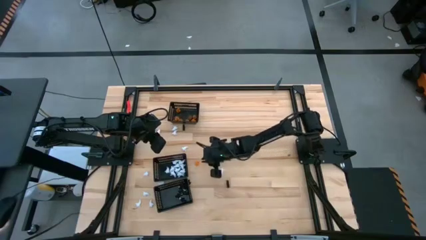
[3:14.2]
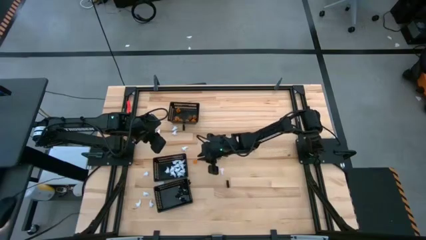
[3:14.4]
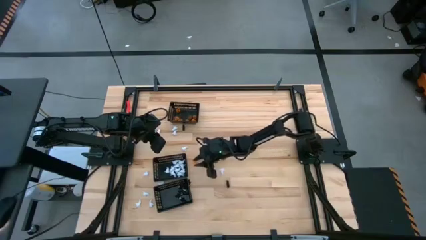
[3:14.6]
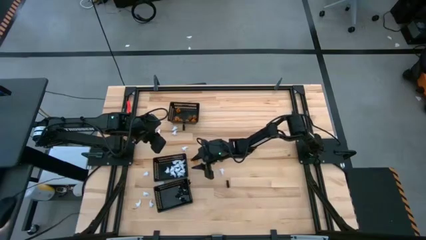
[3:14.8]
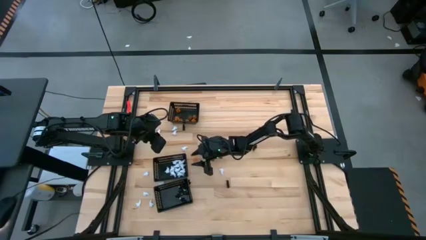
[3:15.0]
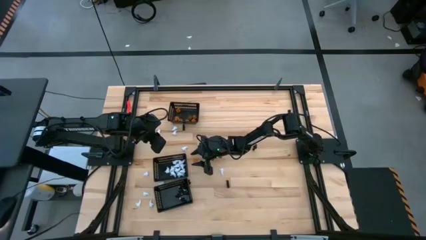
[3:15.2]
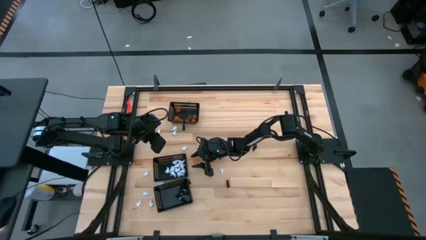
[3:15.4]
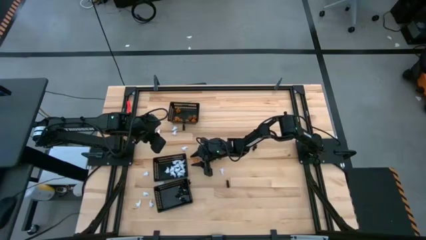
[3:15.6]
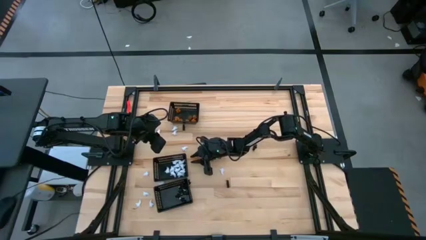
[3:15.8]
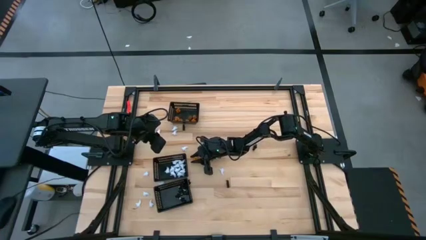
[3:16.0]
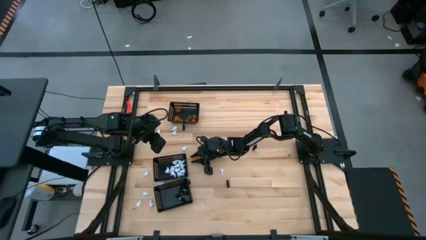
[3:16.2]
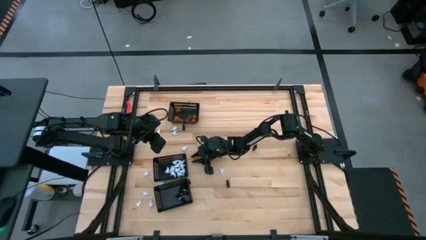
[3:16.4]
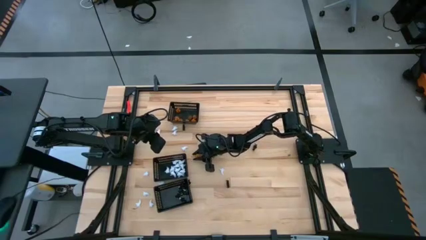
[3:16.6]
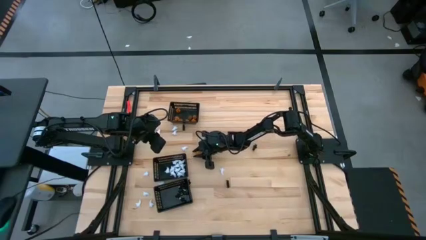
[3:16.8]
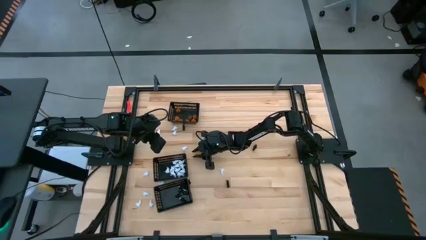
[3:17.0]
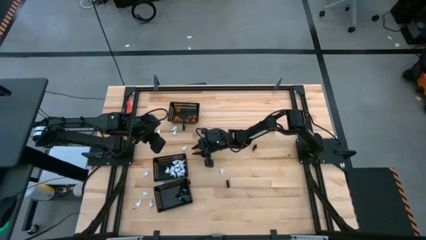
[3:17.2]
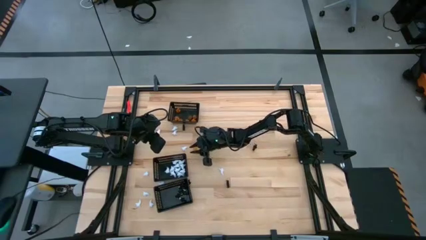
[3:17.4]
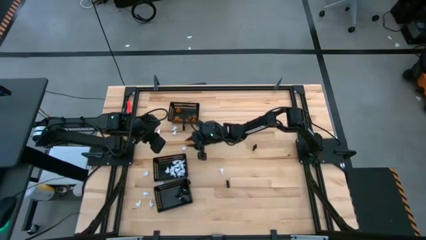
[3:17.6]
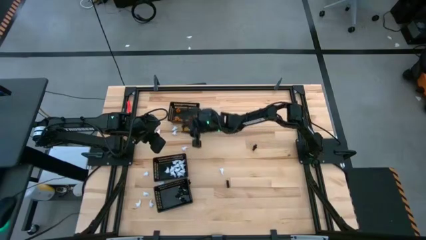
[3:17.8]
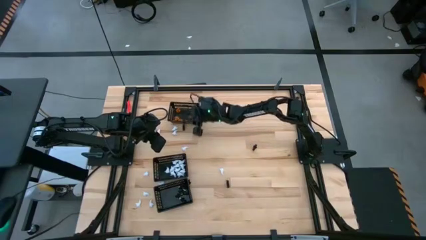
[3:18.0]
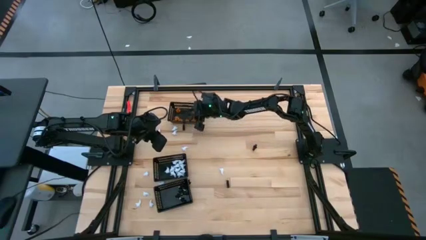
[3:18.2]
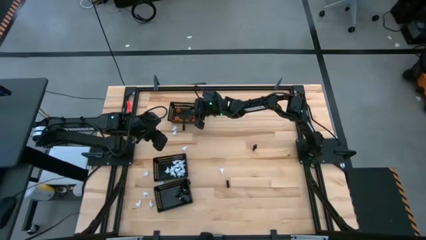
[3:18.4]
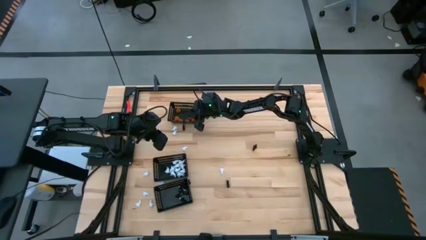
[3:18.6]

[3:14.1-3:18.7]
Task: Sort Halloween decoration
Put the orange pumpkin toy into the top black bin

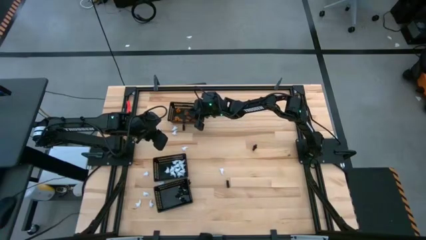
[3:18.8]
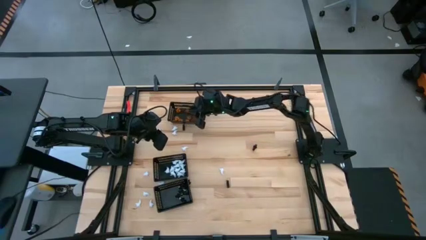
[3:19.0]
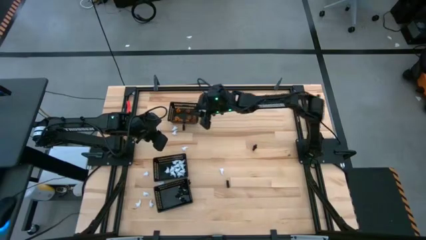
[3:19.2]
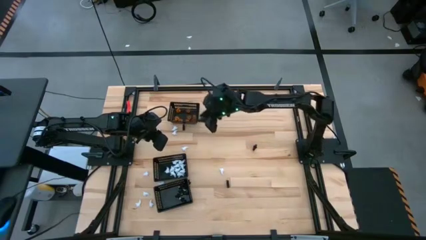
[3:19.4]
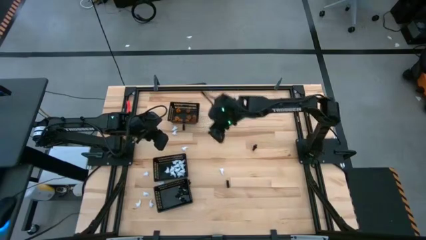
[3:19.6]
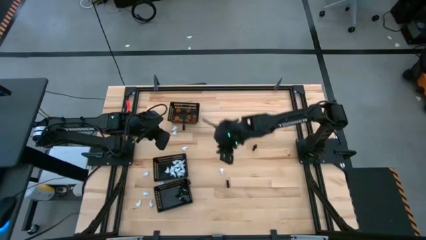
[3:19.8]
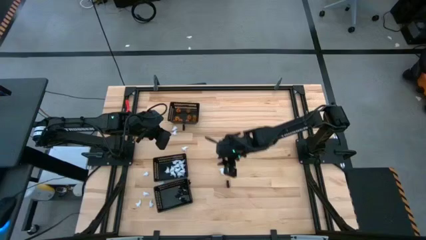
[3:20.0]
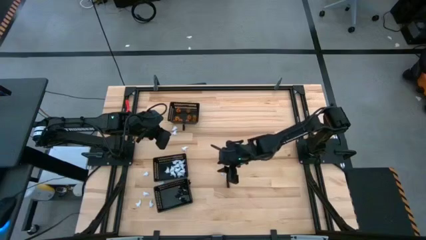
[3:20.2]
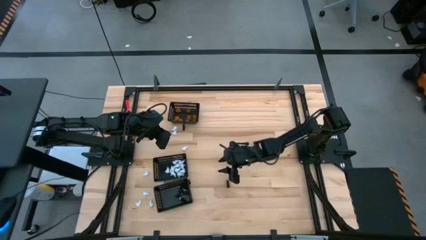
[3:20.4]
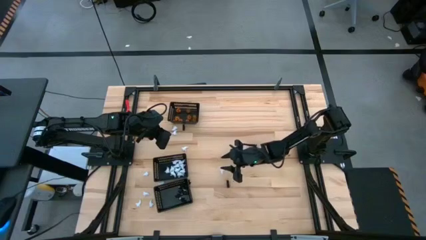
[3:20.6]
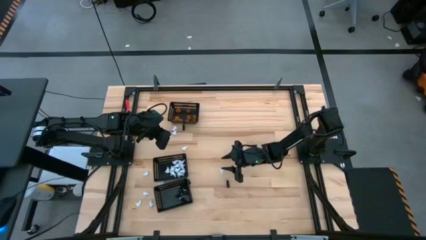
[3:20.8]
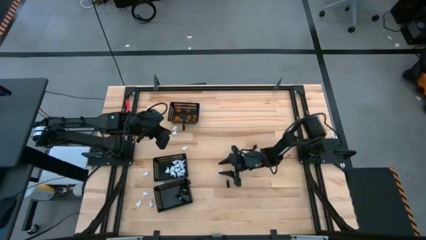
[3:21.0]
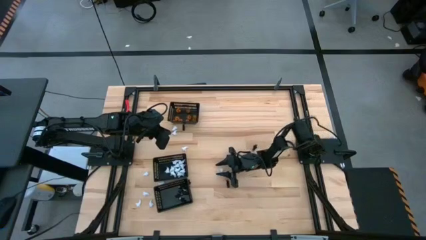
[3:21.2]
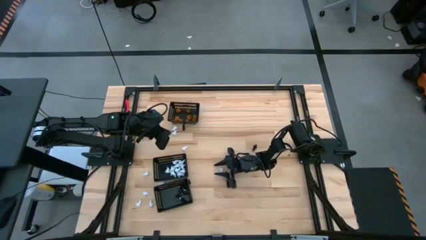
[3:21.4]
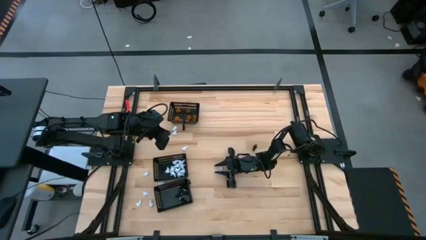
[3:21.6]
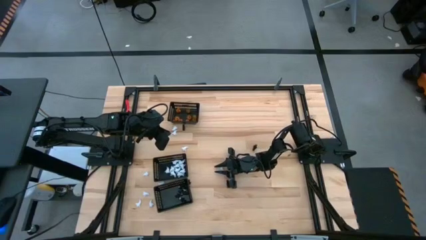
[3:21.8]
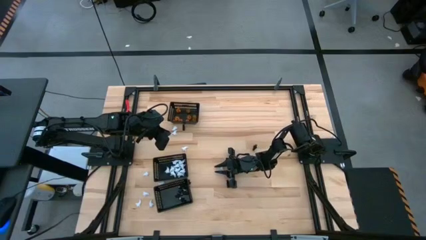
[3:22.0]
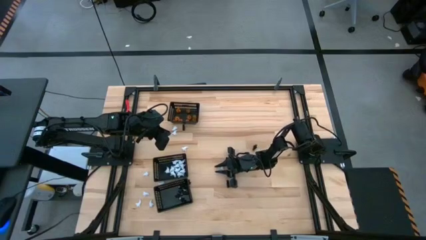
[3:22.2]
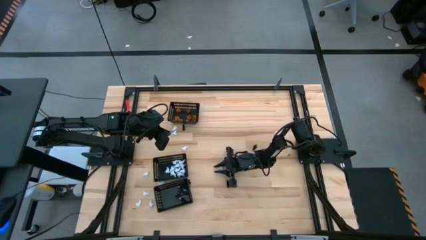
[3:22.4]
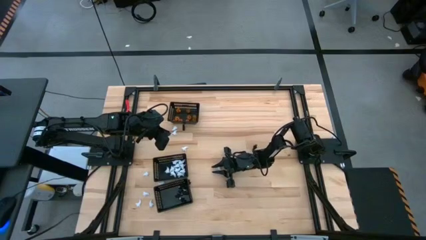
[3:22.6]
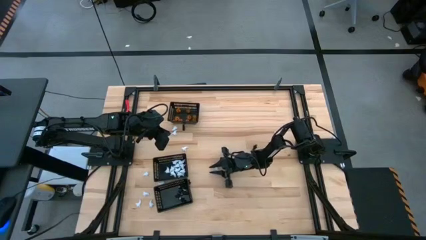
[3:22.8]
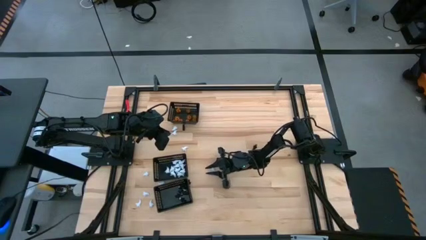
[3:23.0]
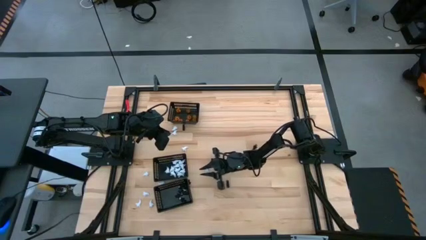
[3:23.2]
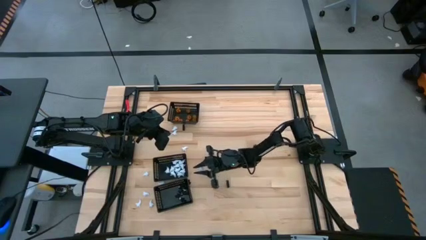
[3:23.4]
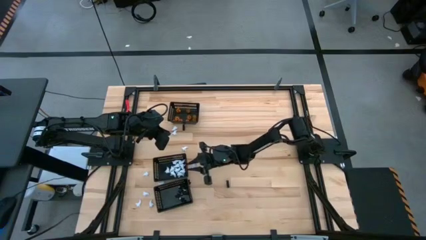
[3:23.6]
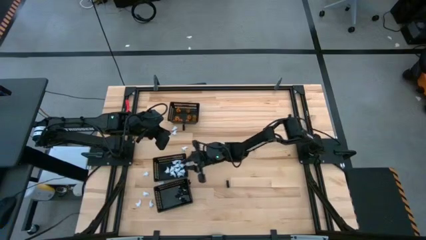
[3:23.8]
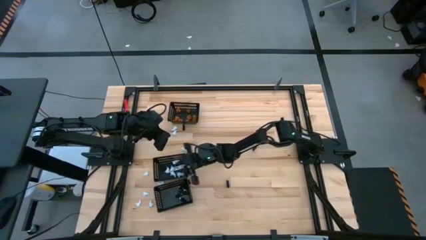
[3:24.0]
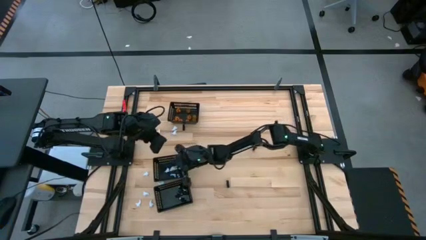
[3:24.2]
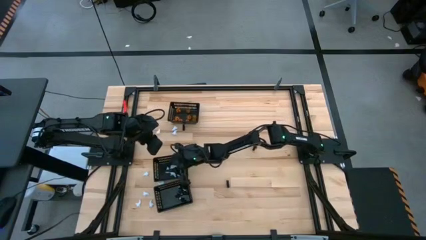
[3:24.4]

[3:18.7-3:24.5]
Put the white toy into the middle black bin

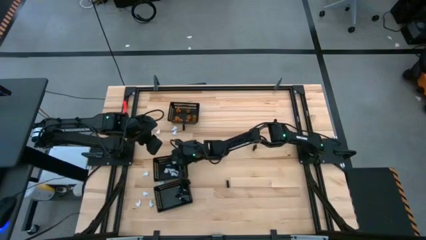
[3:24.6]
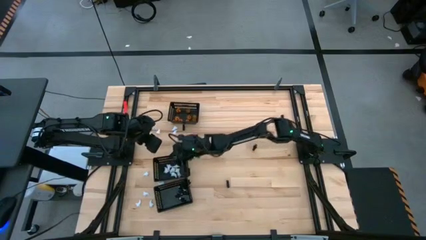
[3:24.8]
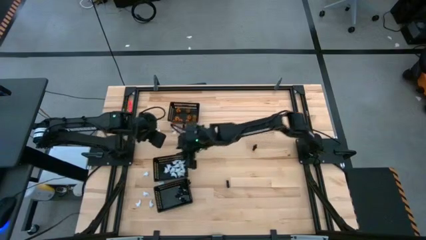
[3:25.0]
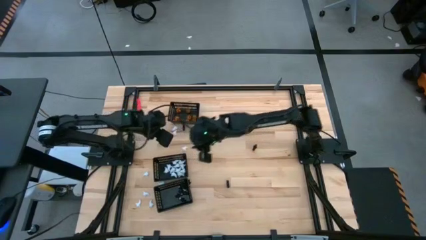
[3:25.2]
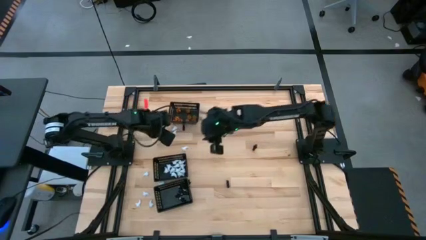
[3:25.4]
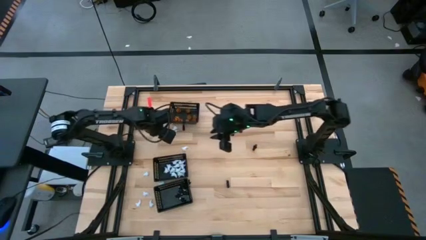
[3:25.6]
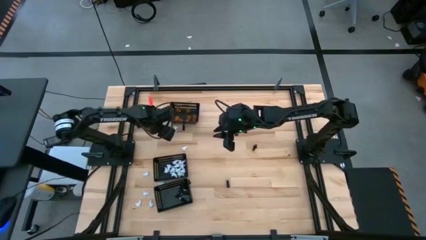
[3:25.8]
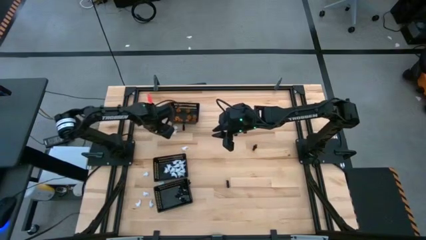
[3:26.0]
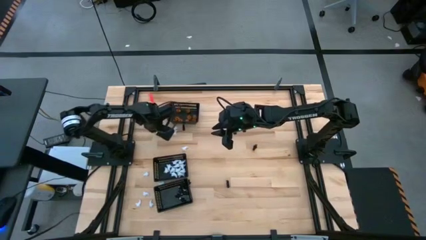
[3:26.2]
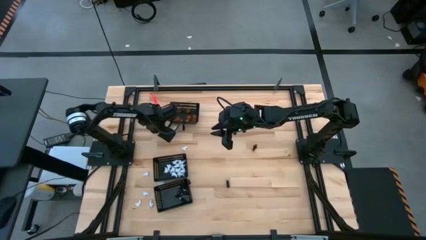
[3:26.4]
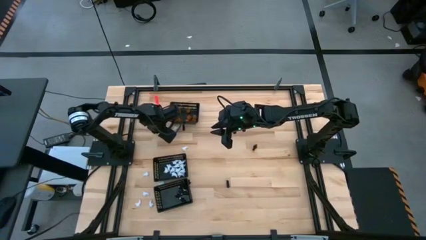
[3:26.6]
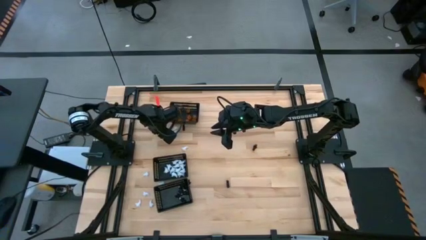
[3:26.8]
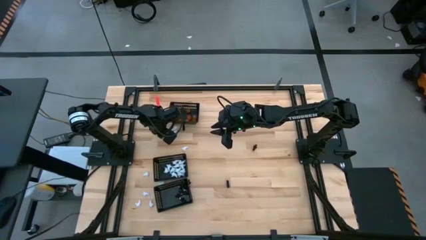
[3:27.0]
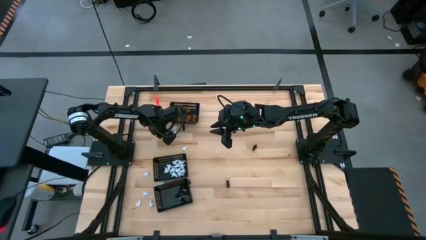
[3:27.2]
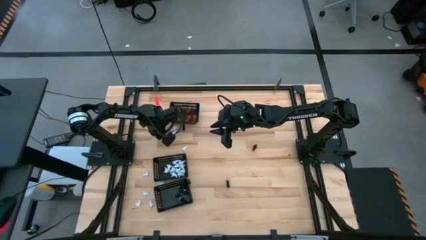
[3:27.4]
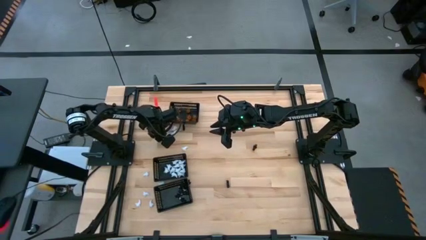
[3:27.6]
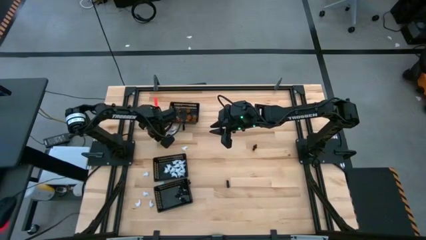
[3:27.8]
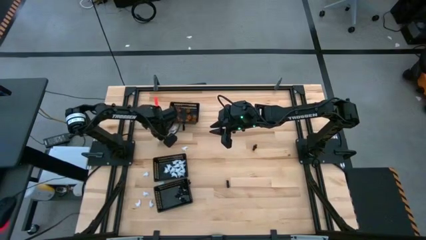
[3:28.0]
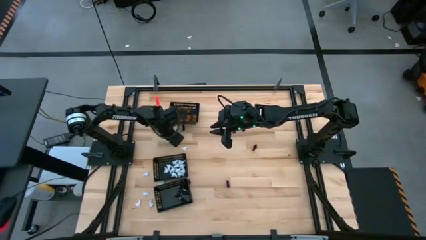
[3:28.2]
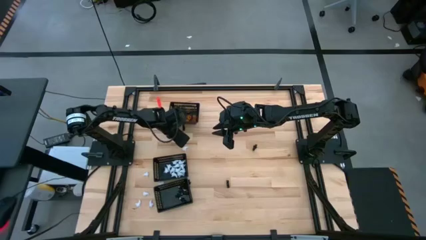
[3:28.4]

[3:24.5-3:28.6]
Put the white toy into the middle black bin

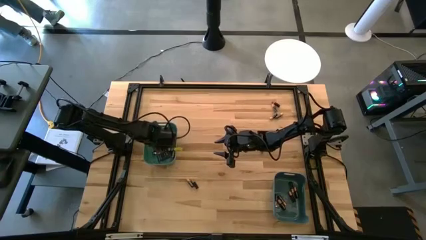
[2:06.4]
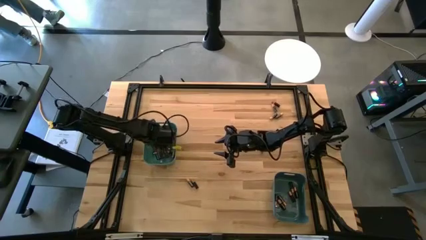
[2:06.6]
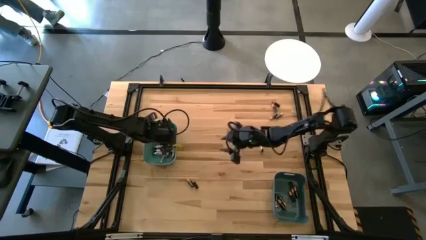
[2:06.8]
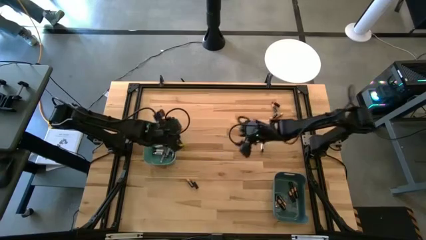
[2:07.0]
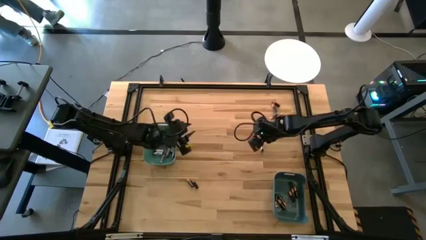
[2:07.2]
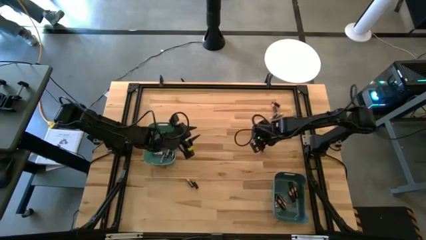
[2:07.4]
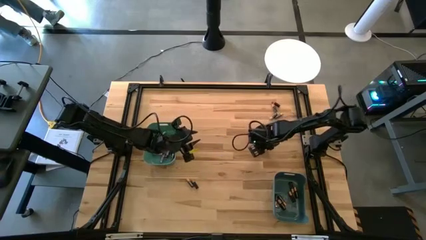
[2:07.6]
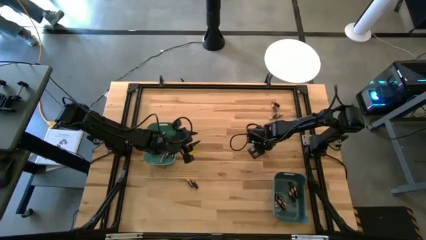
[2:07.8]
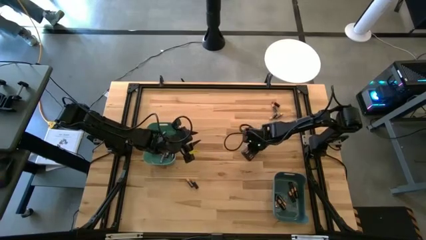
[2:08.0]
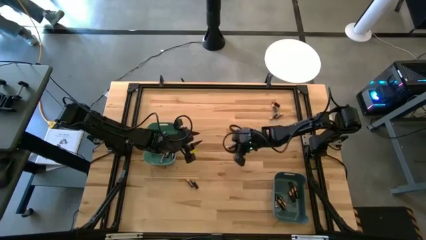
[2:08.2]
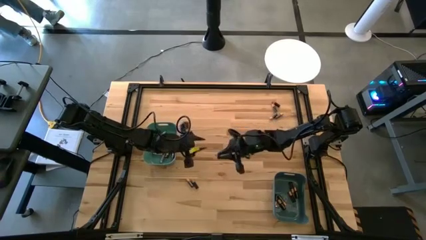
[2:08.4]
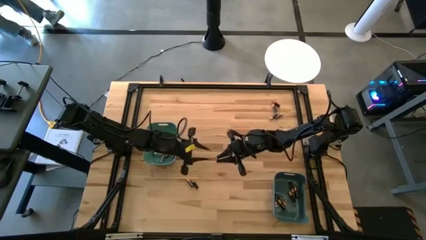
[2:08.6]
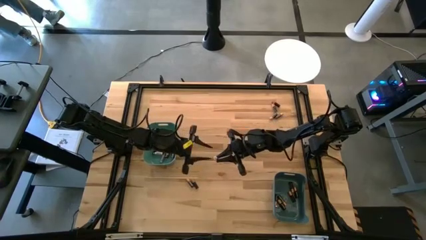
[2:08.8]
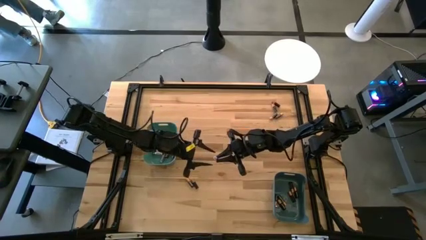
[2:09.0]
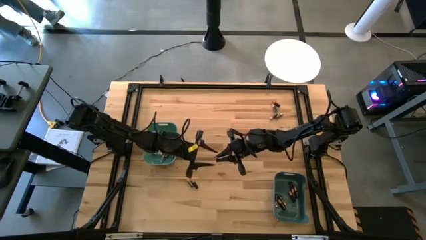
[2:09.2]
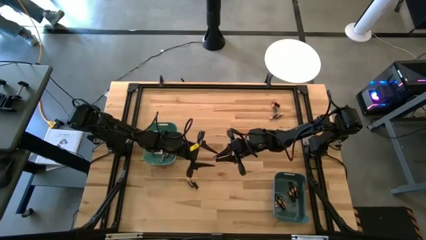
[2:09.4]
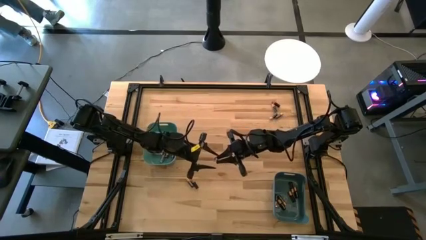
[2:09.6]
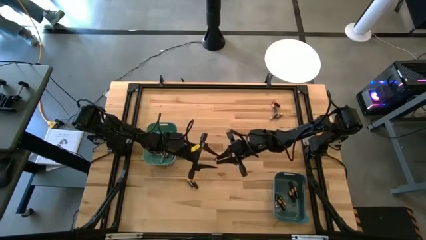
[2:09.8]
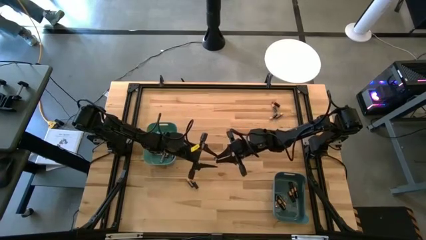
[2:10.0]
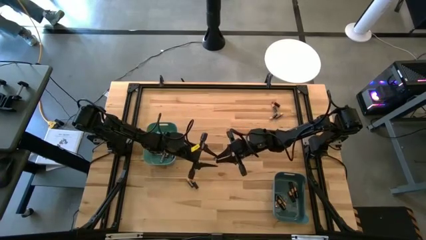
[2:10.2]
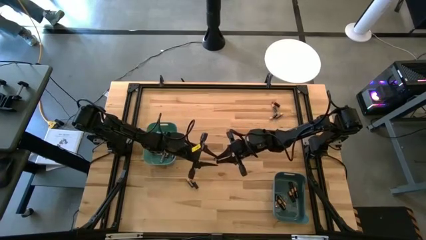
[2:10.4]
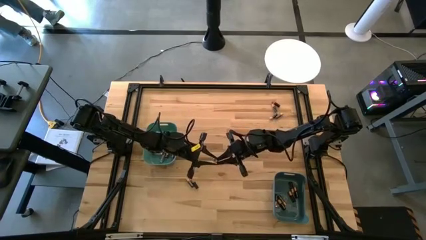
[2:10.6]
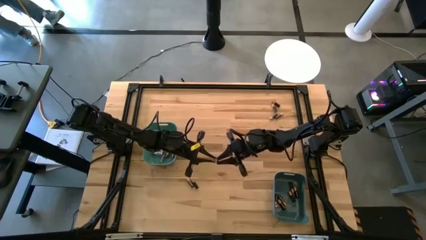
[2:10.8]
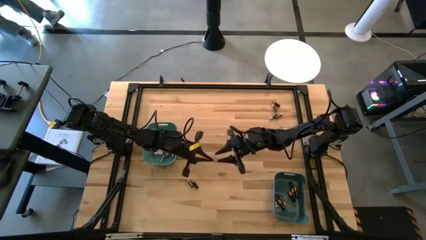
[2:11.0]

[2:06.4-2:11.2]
Task: Sort batteries
Put the silver battery into the green bin
